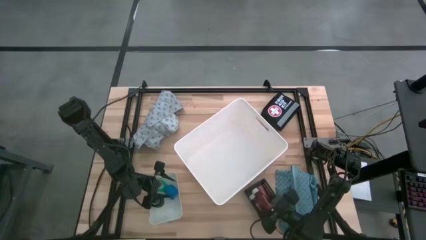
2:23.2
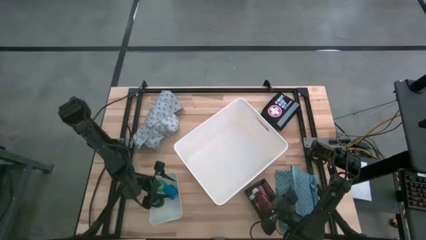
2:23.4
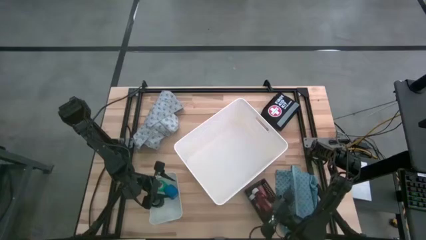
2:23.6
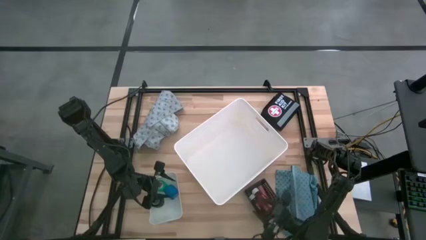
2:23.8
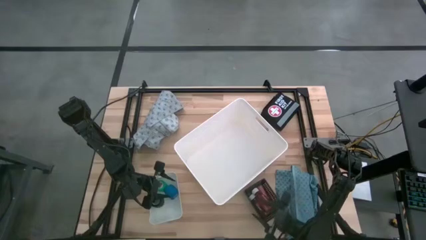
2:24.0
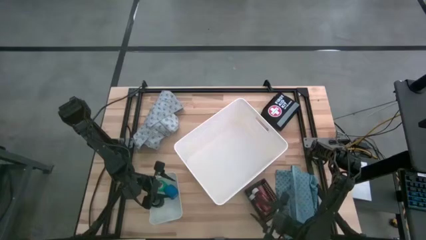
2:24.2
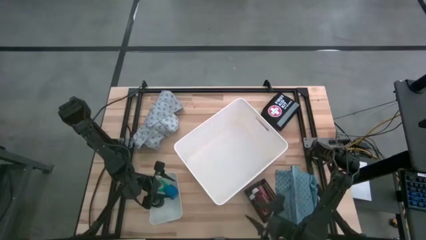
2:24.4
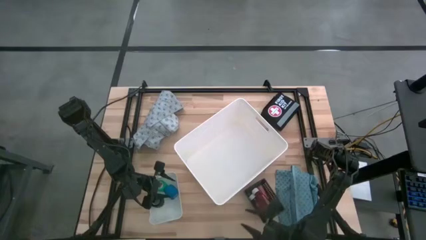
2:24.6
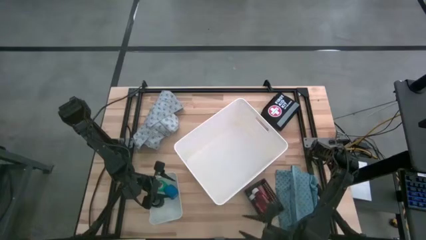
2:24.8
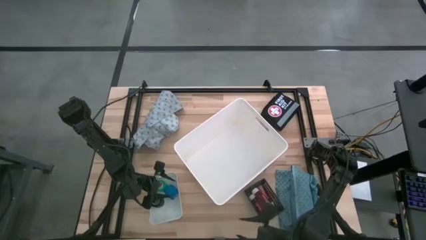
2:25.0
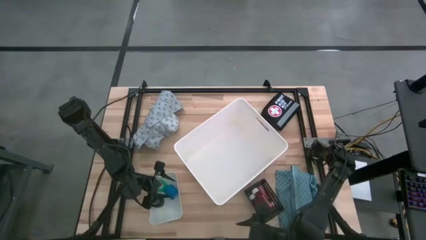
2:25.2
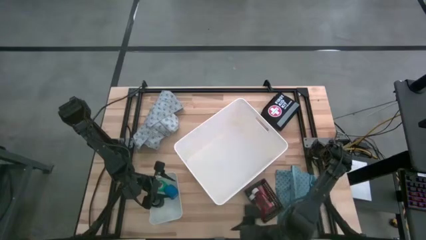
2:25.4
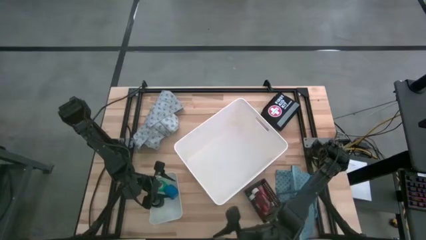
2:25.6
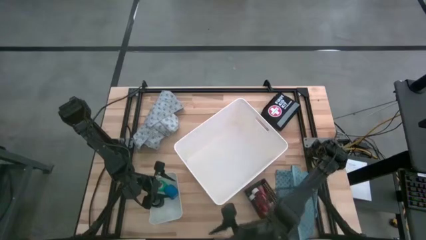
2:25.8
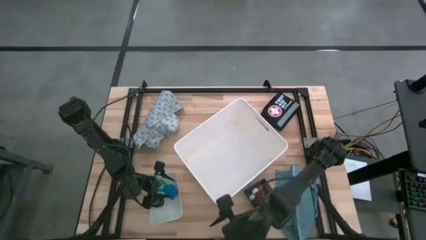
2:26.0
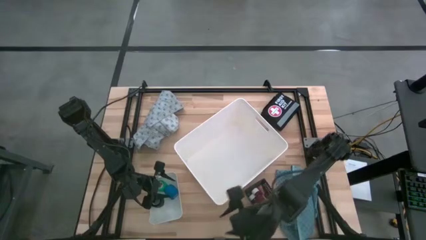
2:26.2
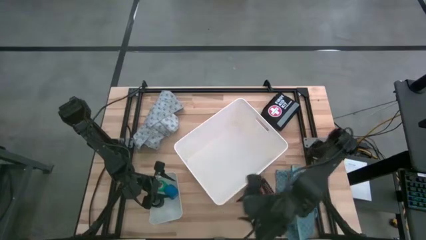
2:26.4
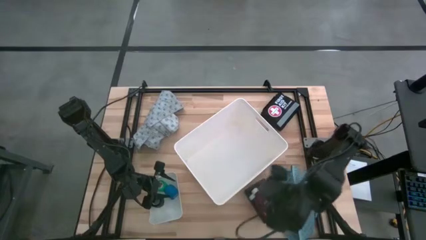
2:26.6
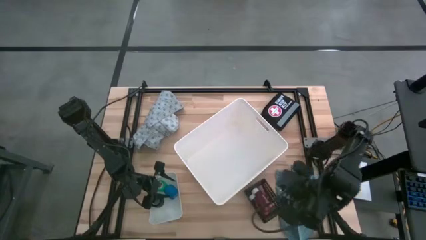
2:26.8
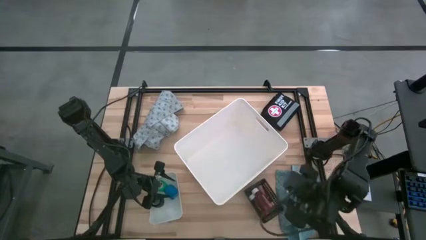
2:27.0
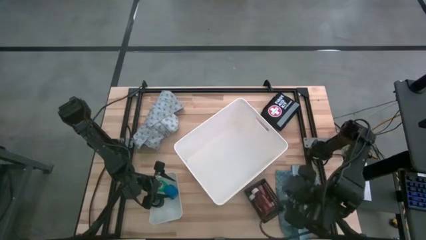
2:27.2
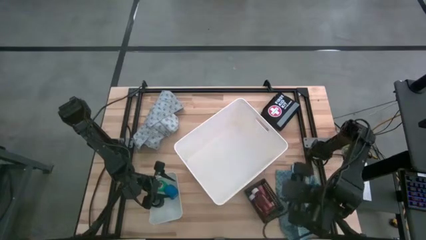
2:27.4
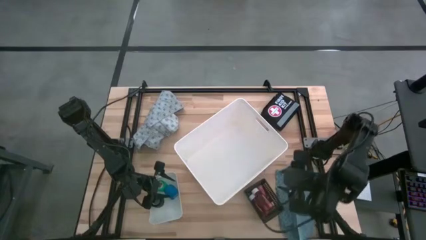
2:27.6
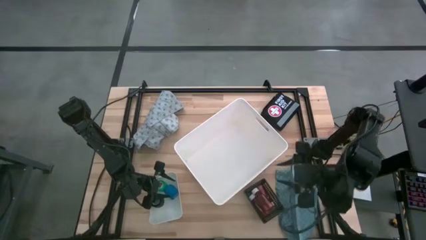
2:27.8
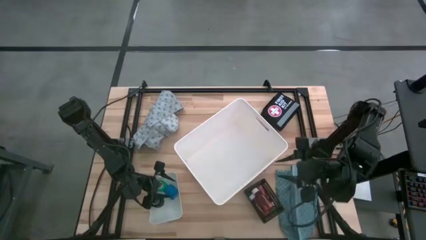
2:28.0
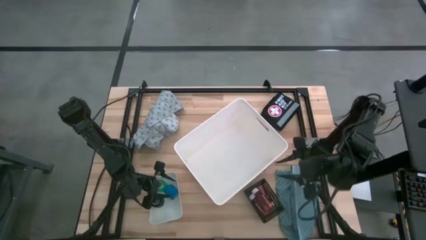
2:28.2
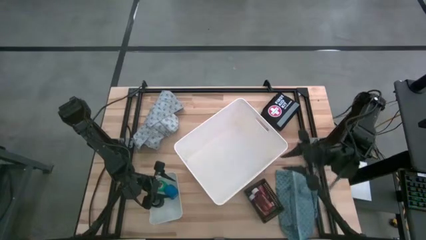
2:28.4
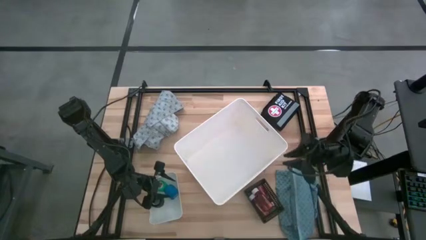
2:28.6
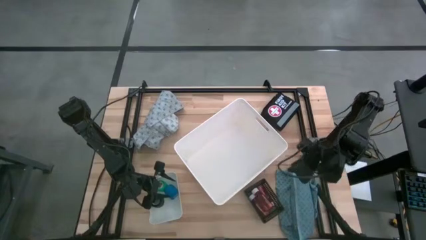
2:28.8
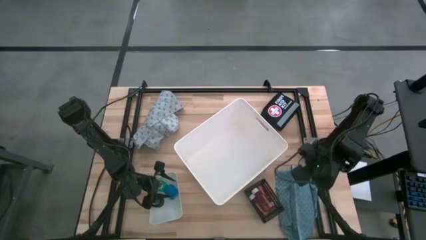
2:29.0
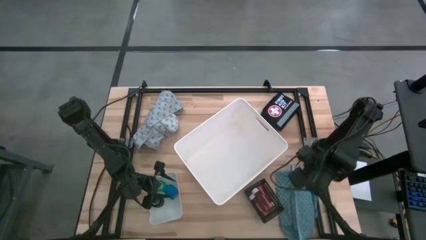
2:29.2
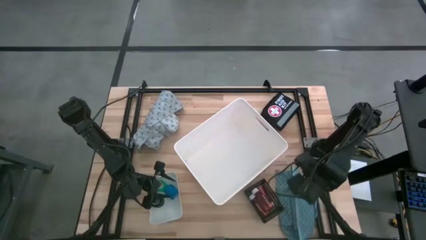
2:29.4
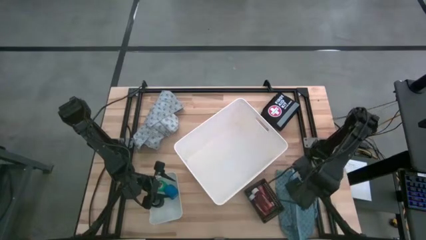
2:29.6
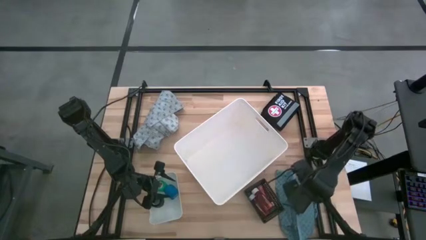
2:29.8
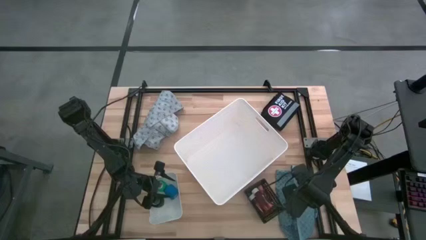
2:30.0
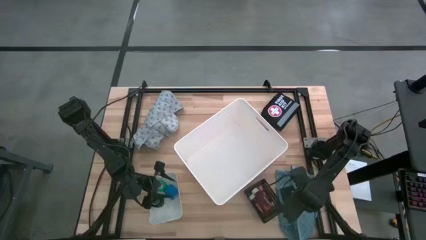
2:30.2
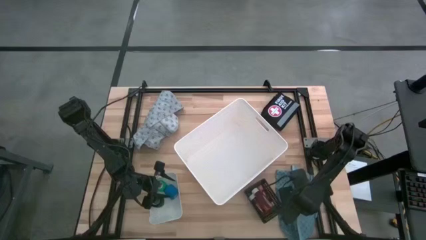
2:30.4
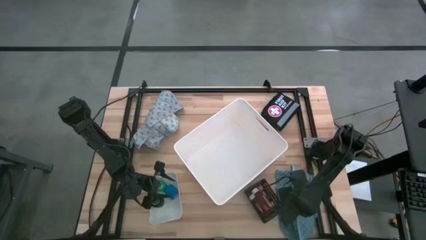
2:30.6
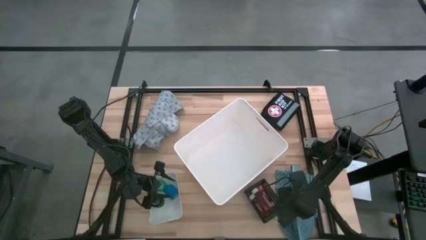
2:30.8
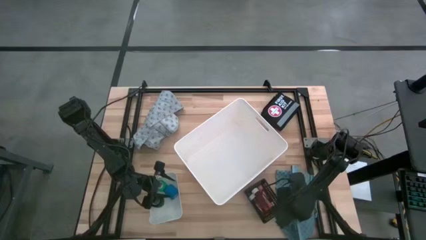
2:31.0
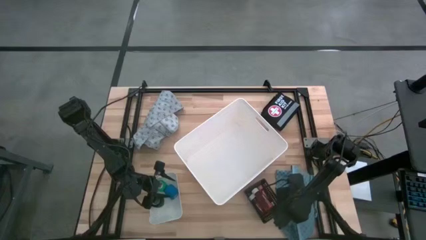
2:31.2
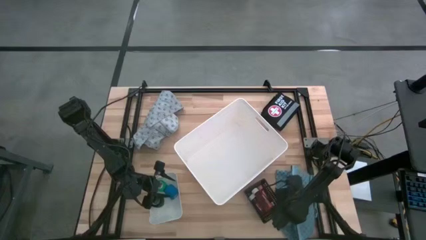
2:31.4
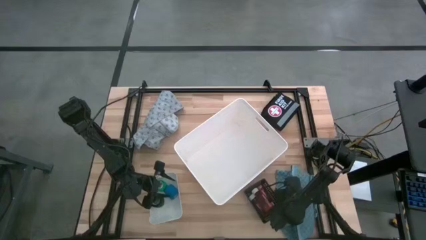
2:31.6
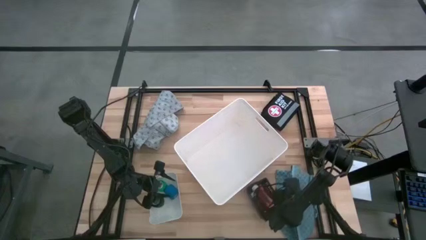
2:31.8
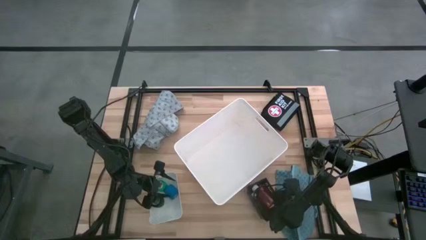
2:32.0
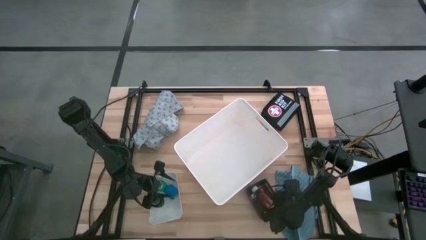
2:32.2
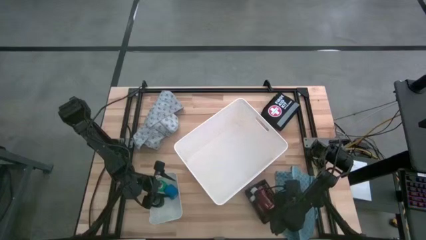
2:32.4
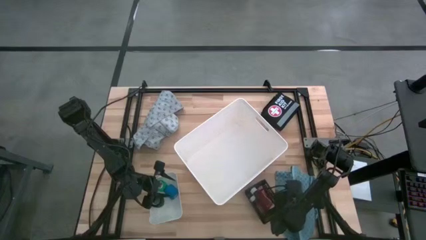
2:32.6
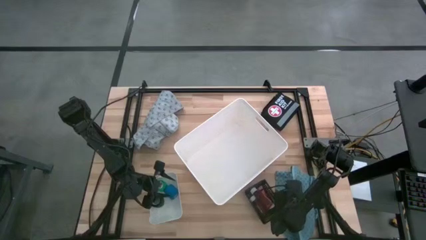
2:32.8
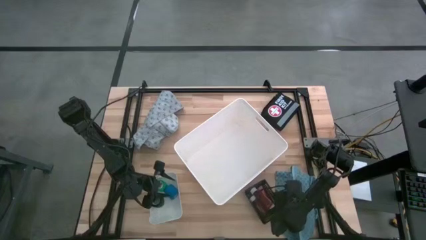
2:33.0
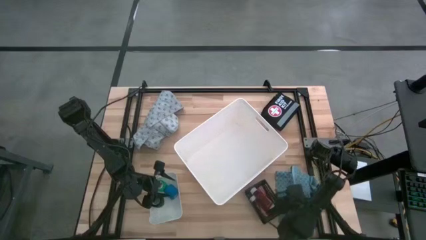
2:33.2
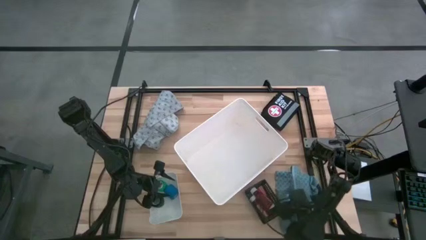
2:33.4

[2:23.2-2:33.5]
Task: Pick & place medical supplies in basket/bin
Put the blue patient gown into the white laundry bin

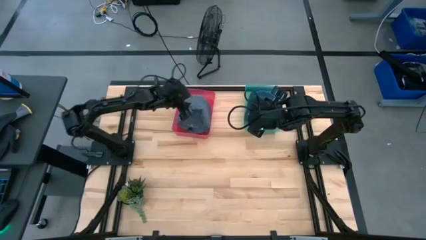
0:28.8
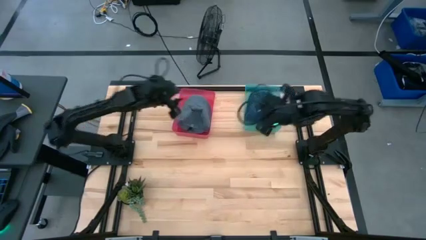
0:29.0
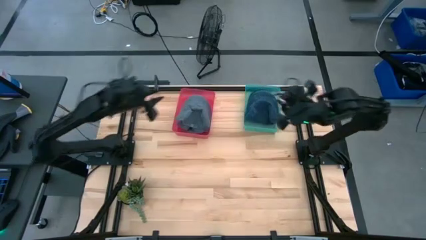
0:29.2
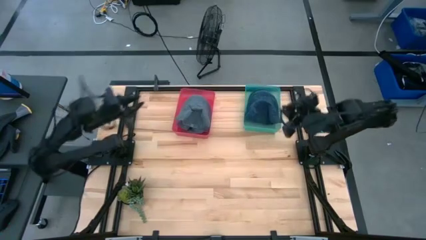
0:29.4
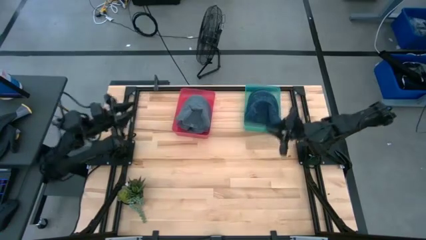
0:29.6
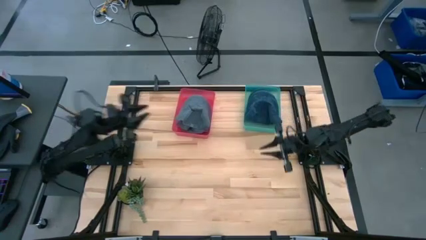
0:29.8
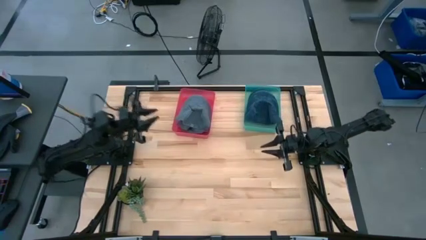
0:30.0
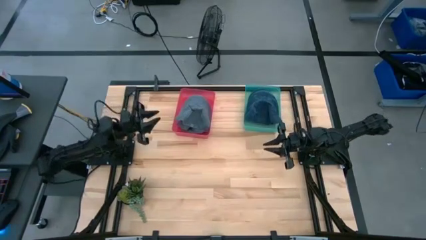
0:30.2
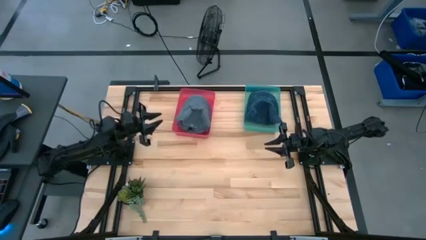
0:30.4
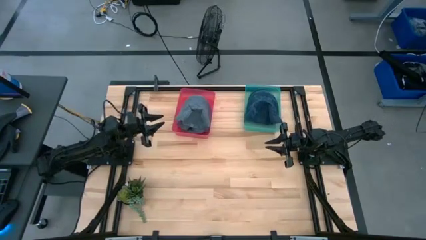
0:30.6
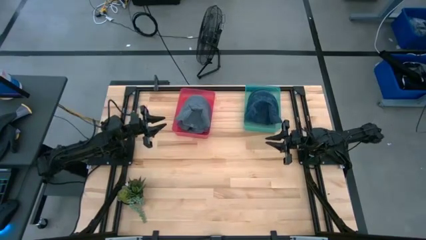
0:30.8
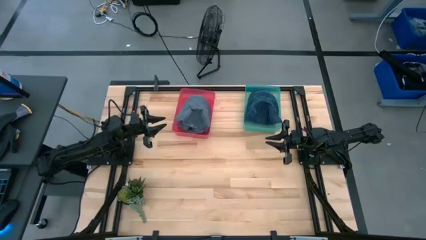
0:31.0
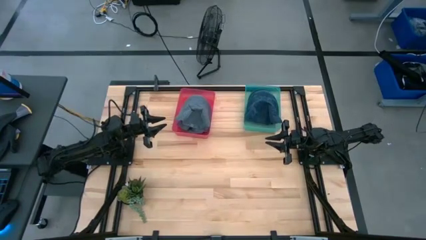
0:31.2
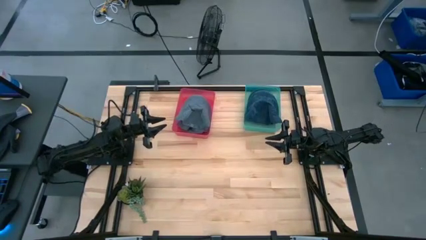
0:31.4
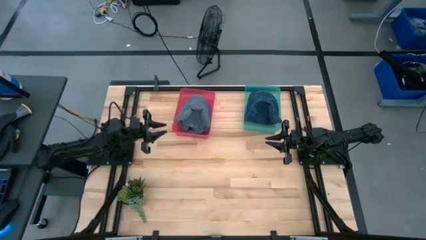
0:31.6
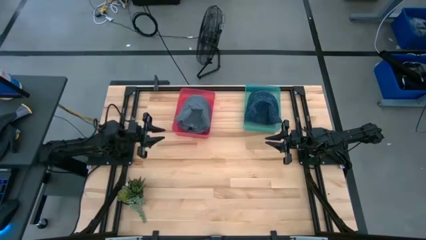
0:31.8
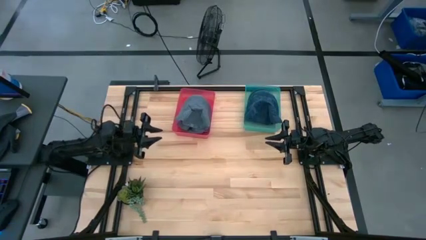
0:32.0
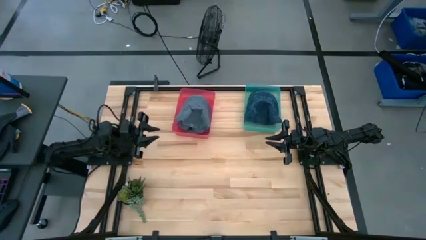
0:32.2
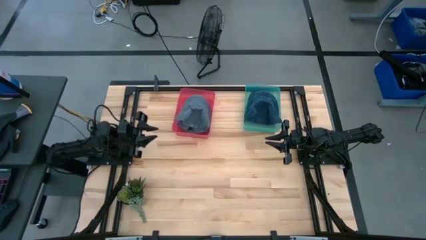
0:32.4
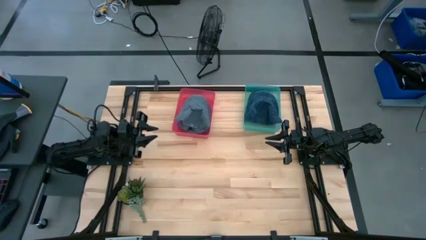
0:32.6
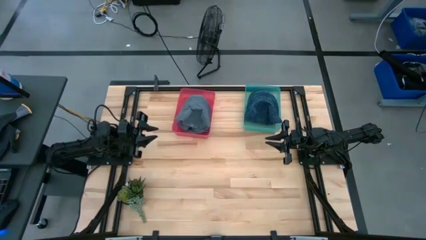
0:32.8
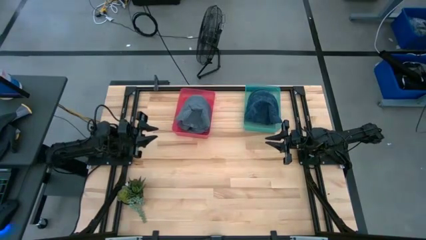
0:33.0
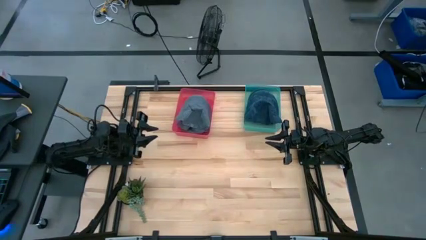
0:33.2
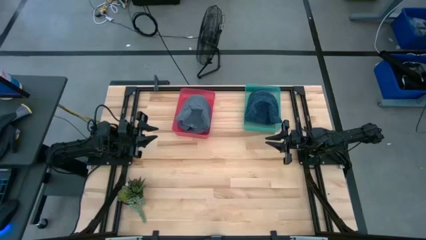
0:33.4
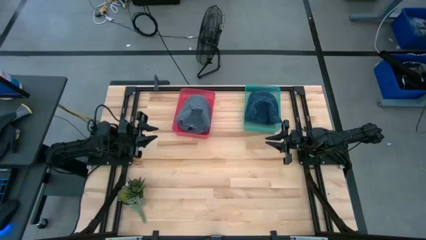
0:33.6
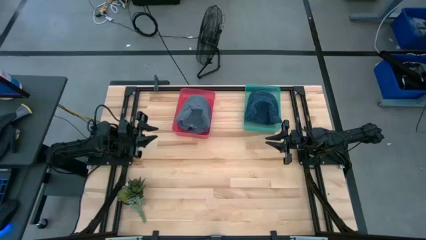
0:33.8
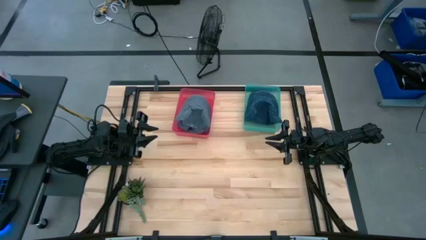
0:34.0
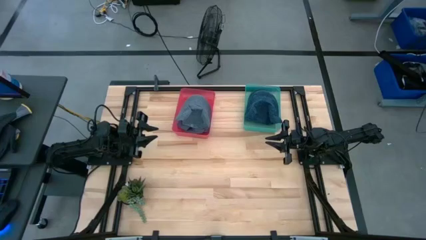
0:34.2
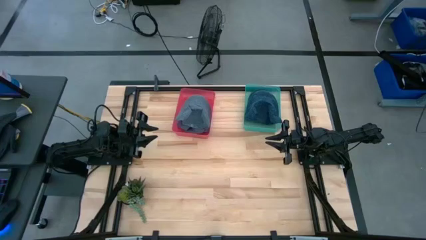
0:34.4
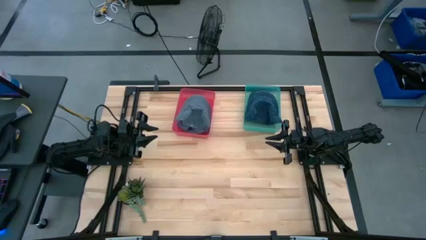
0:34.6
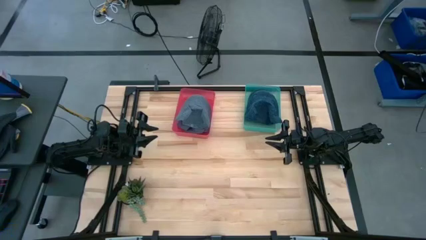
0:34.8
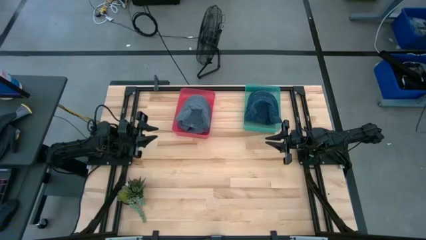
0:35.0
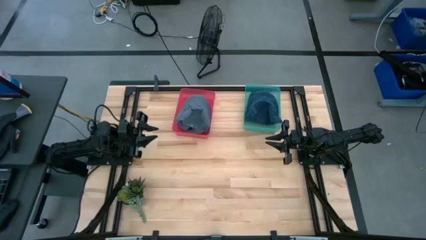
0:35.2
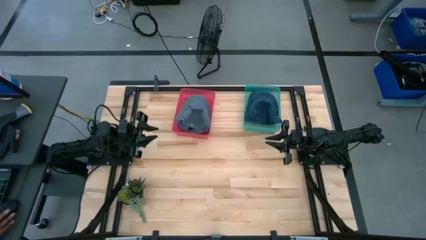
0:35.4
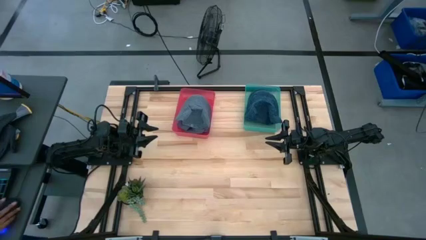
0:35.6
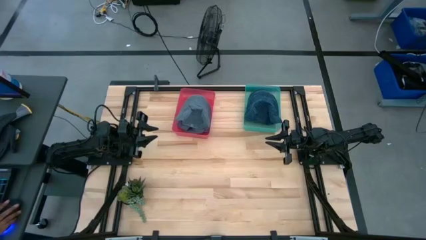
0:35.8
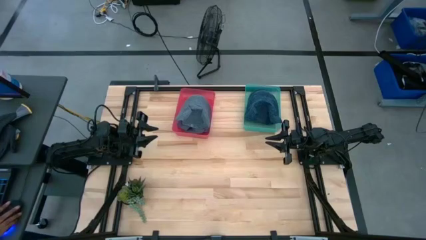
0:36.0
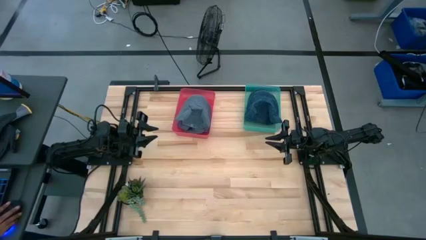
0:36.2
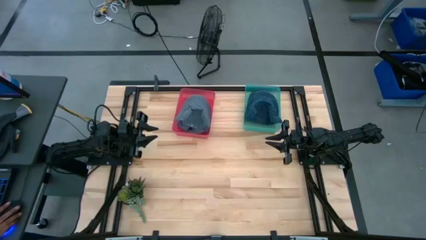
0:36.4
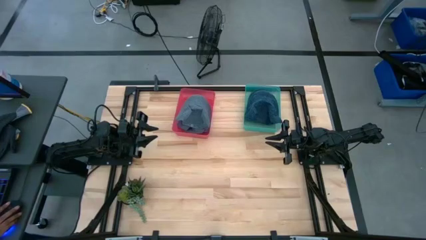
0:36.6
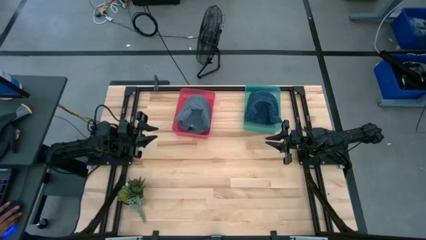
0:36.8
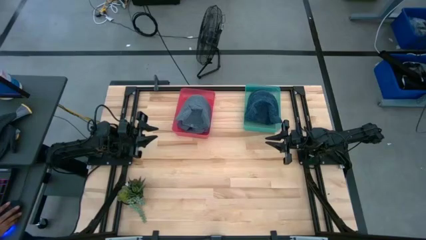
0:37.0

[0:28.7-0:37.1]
Task: Pick & Place hat
Return to Home Position
